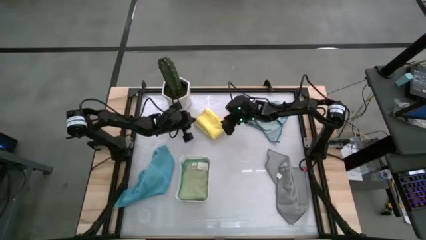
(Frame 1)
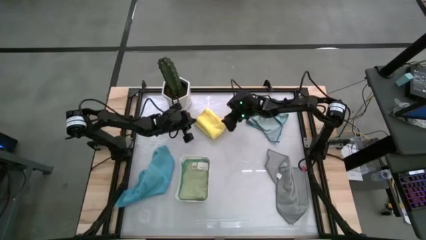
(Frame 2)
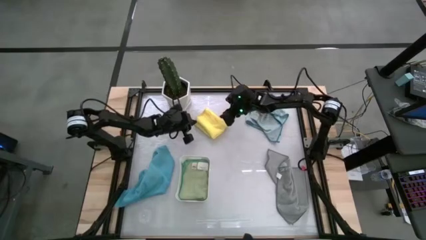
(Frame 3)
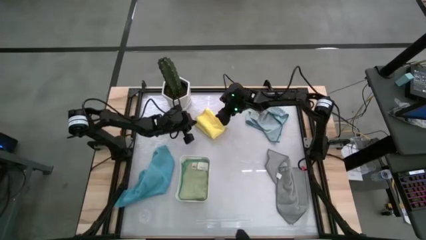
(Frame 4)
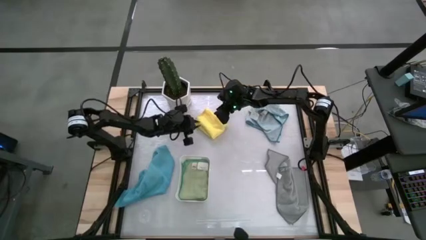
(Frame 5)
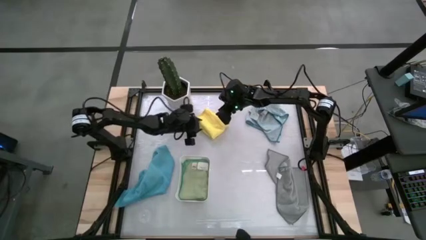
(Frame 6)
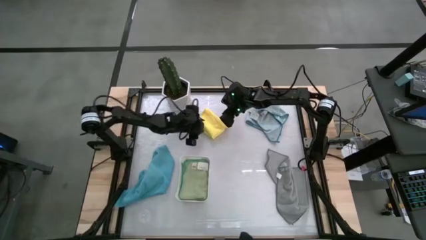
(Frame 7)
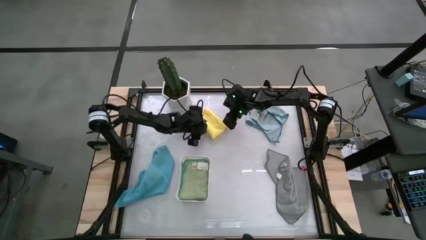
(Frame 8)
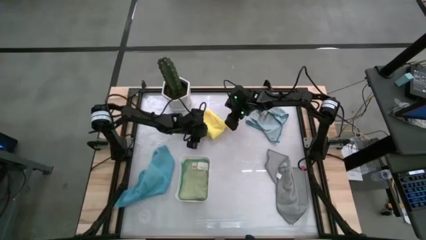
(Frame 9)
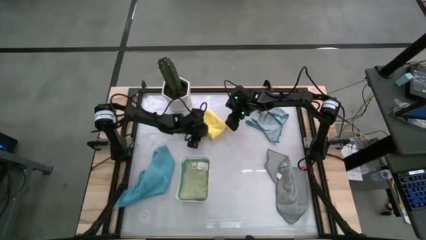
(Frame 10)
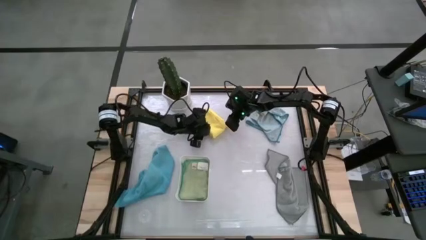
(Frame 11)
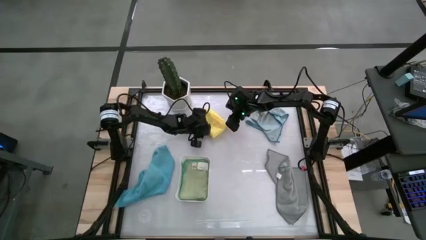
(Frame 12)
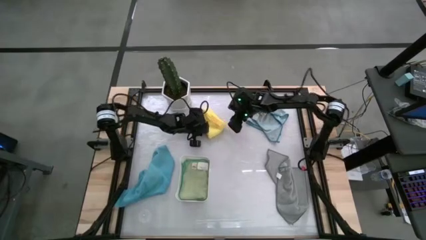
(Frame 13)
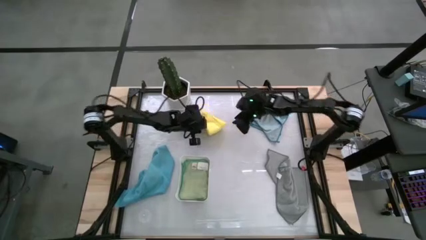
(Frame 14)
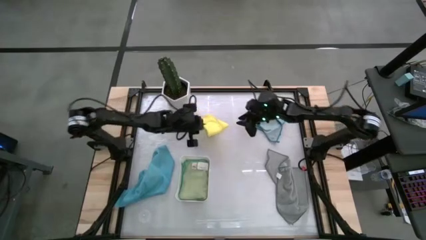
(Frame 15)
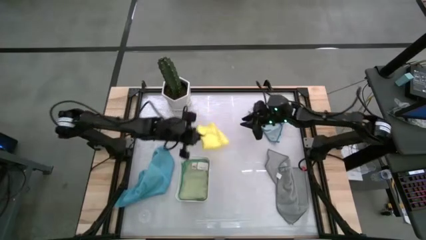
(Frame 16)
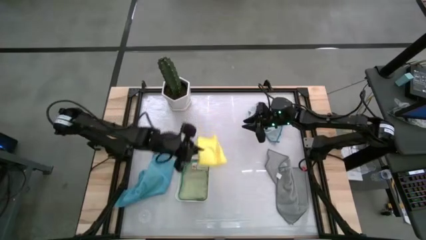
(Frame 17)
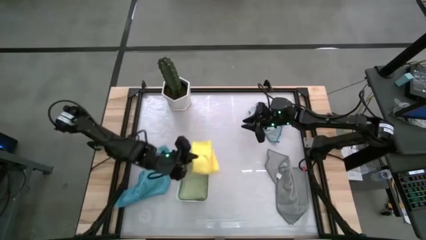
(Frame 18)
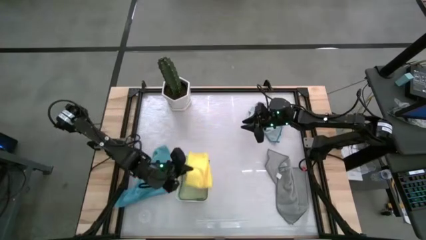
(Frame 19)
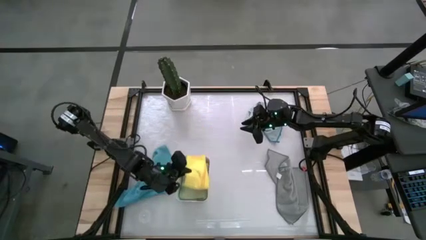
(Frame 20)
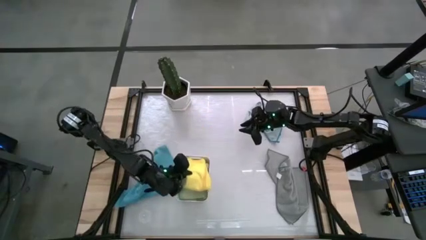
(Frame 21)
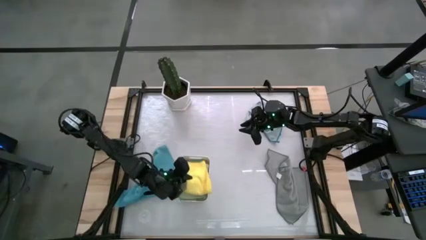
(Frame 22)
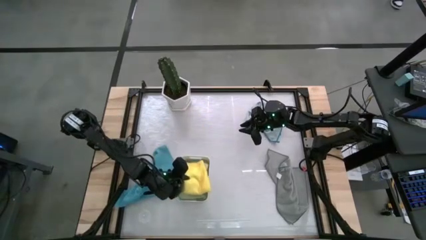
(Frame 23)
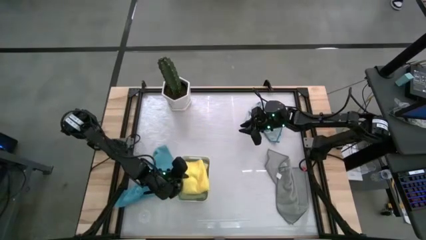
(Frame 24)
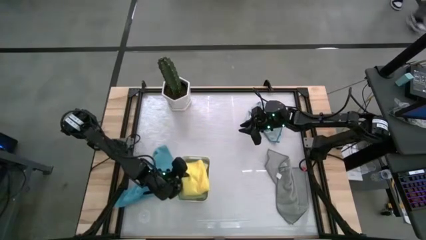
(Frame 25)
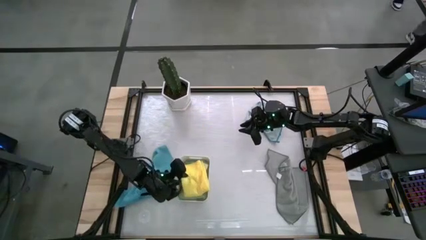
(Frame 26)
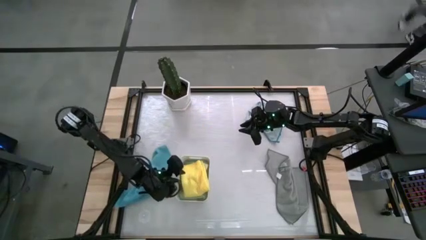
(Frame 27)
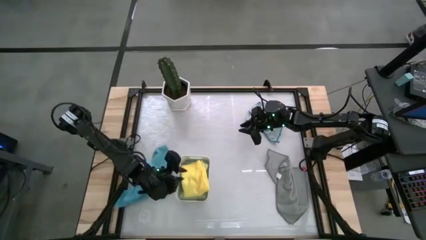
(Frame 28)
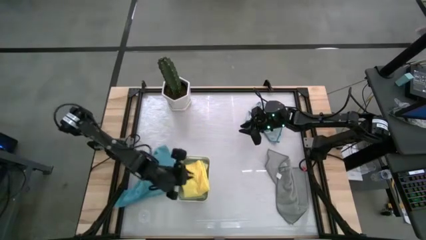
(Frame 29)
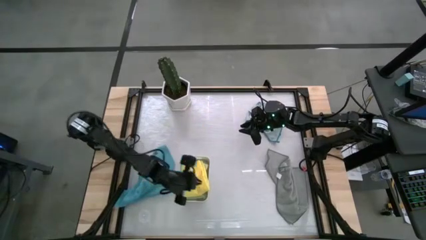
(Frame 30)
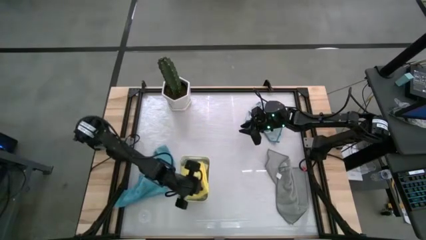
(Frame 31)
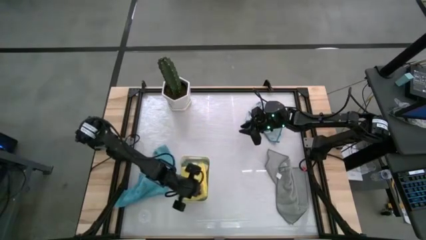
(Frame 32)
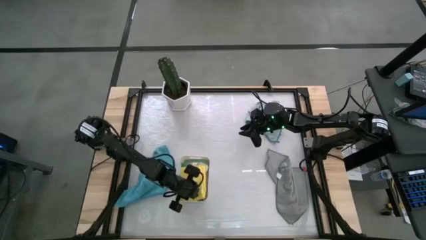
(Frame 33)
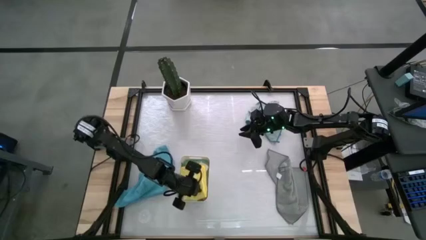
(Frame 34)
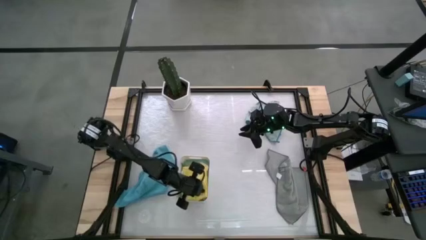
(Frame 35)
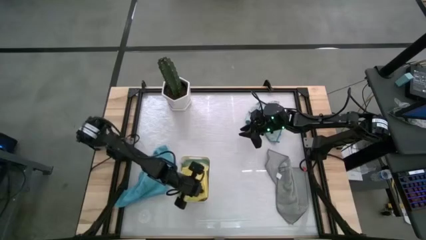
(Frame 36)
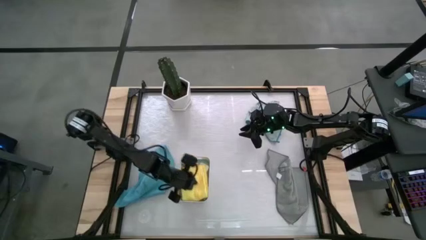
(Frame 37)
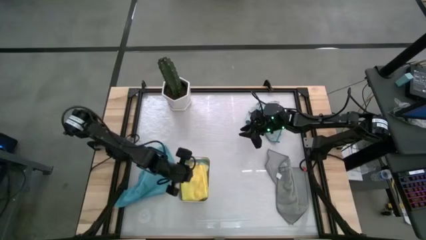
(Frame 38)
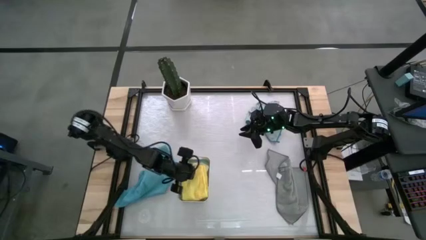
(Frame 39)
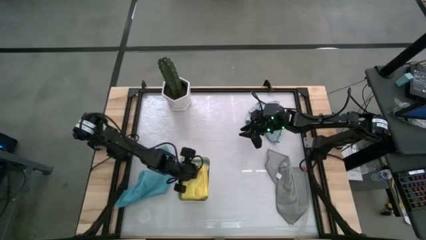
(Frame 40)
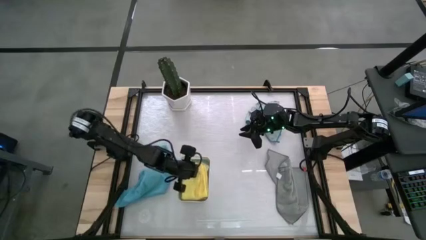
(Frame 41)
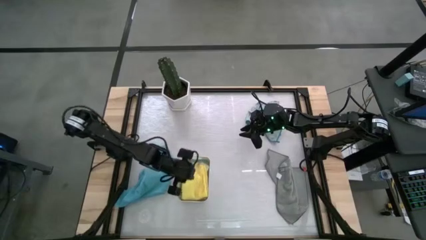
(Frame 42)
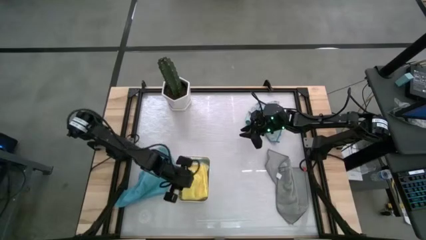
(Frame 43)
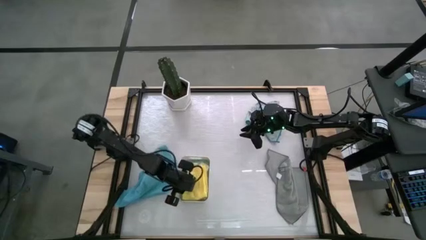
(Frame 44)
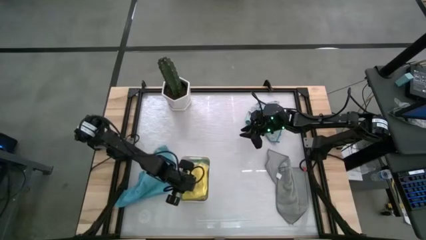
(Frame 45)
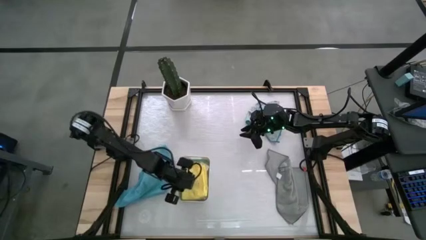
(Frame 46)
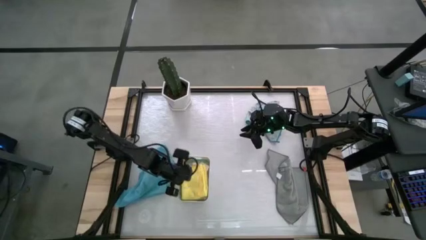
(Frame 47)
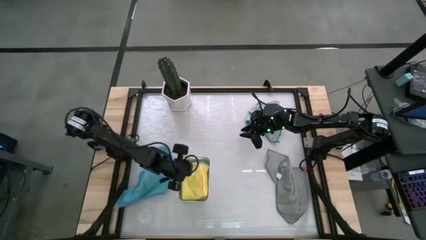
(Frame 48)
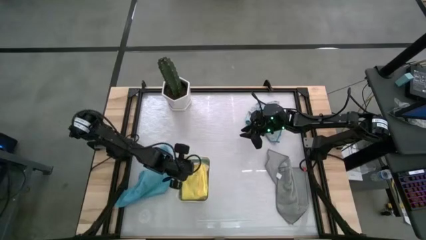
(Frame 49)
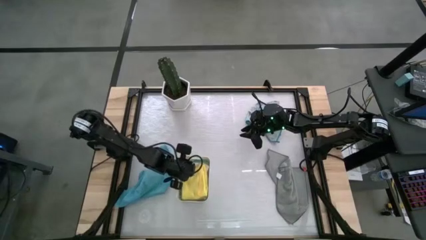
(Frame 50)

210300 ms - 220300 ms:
Task: Fold microfiber towels
Put the yellow microfiber towel into the bin

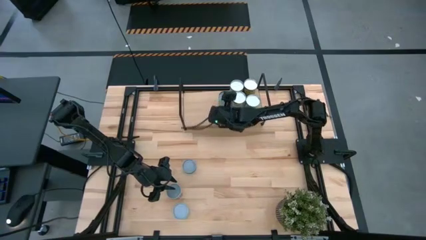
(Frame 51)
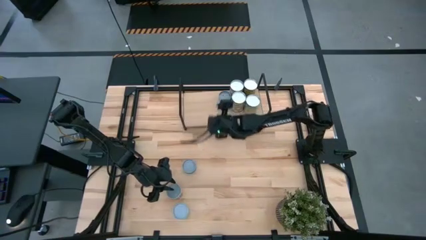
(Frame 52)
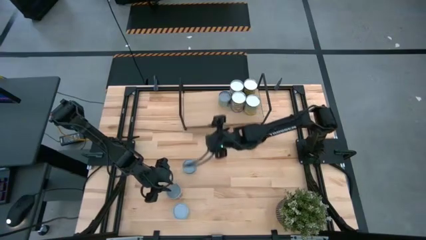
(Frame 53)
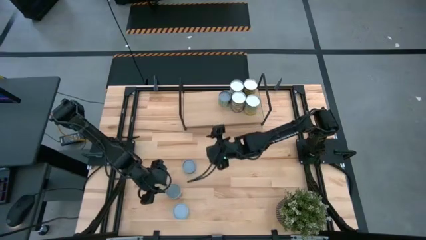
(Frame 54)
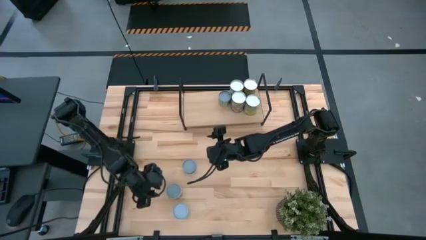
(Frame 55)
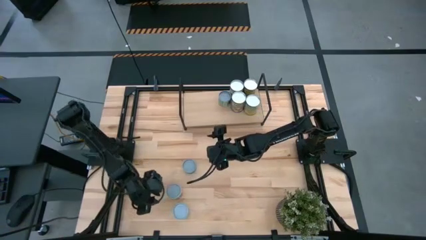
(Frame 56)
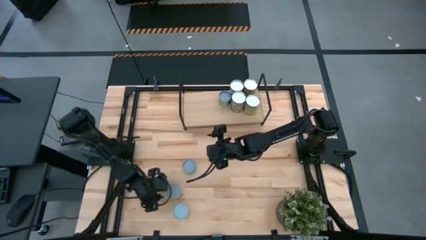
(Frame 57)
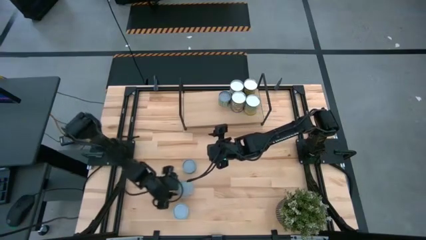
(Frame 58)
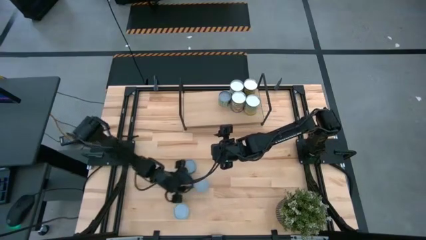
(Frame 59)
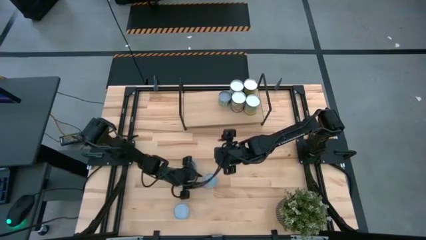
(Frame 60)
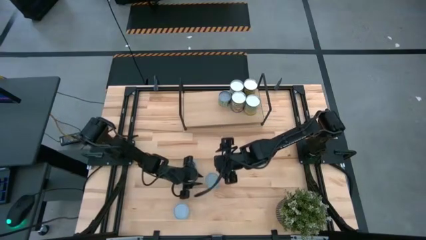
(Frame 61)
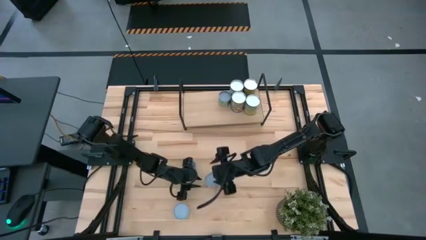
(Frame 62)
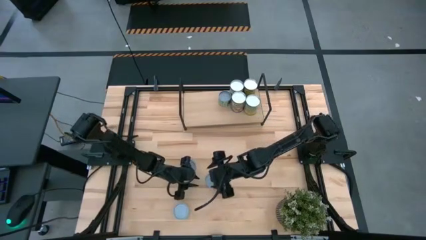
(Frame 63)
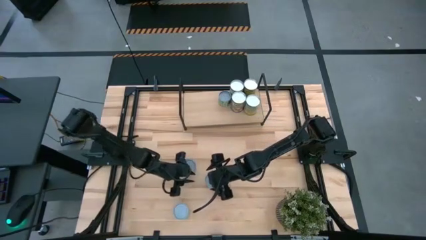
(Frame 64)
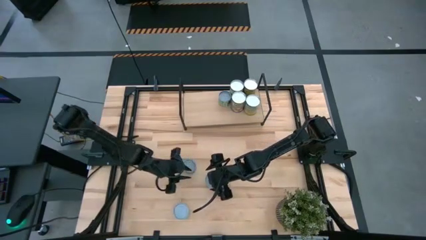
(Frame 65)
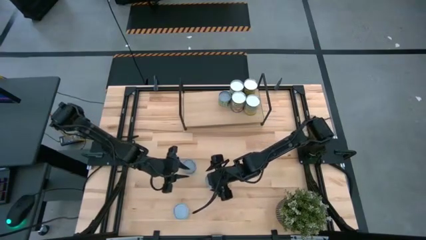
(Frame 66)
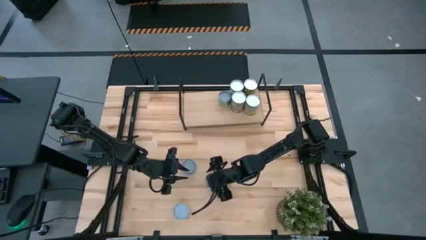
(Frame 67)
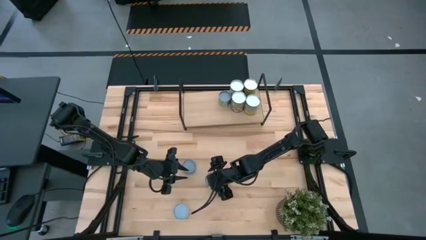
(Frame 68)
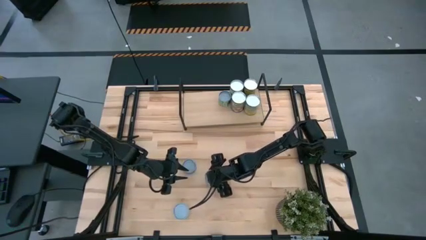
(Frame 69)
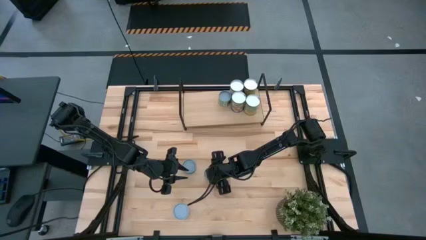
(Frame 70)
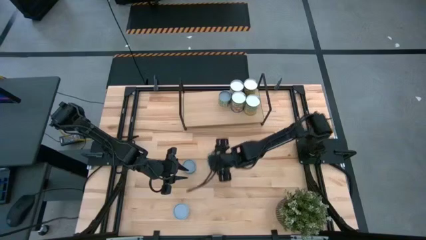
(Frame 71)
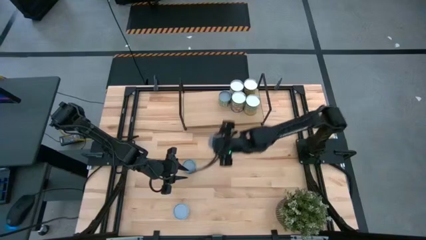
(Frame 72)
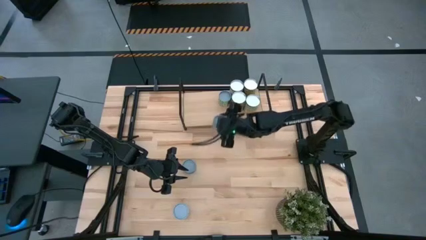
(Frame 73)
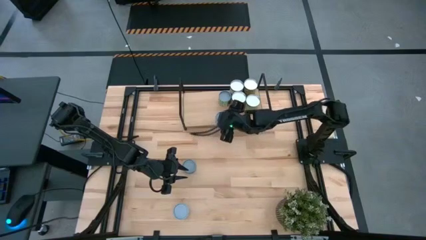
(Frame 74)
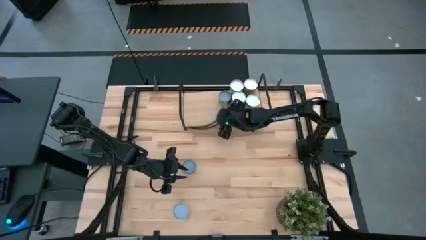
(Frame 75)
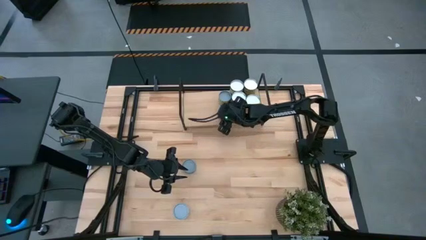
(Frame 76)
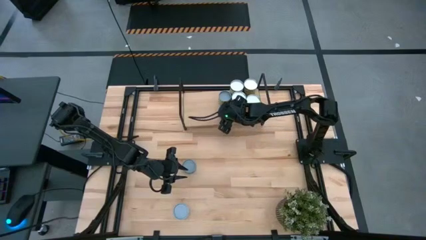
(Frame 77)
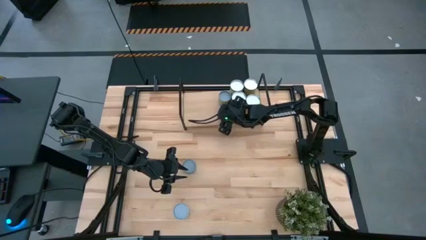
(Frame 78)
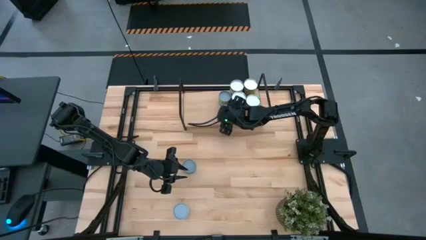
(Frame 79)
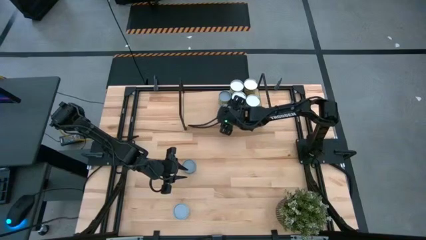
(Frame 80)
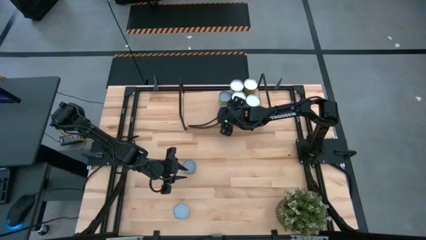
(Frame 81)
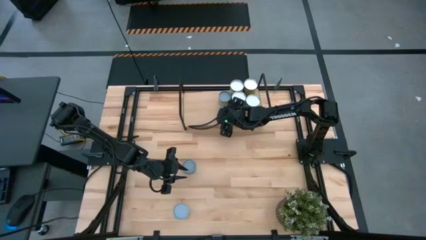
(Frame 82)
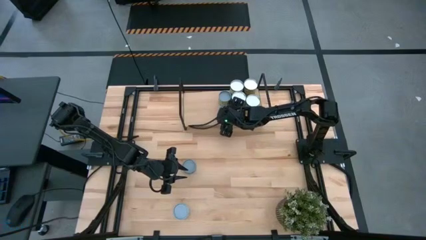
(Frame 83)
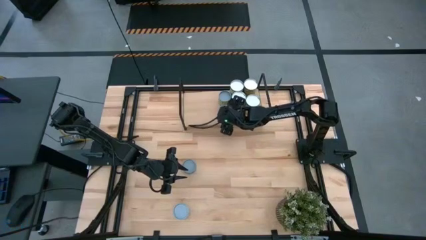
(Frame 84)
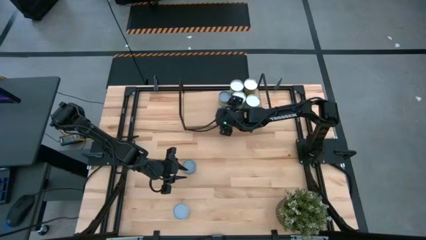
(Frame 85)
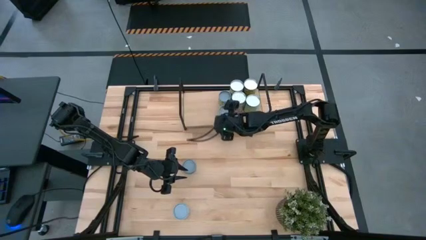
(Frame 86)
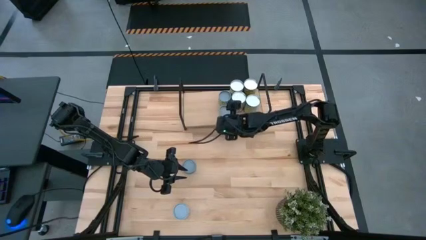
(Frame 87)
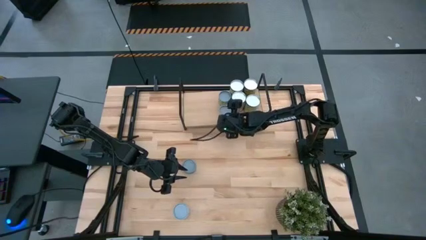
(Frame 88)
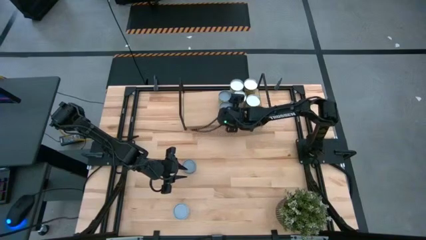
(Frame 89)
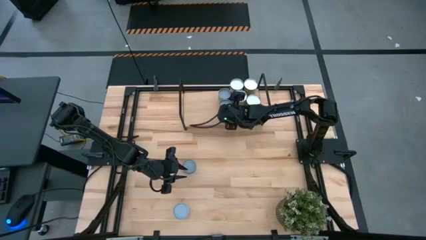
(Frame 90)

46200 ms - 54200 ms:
Task: Pick and place cans onto a shelf
Put the canned diced tomatoes on the shelf
